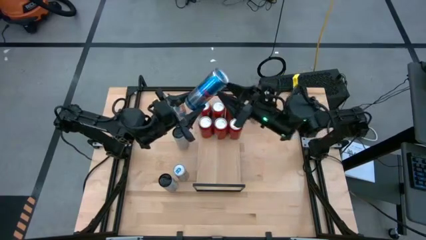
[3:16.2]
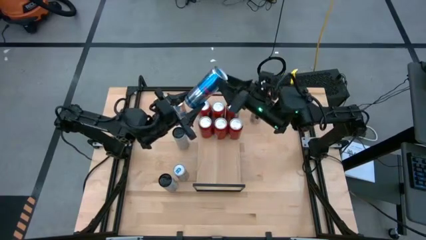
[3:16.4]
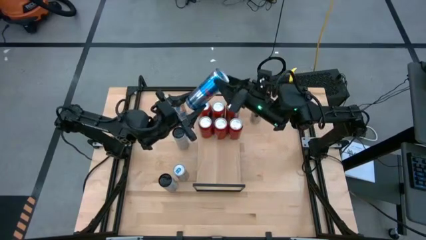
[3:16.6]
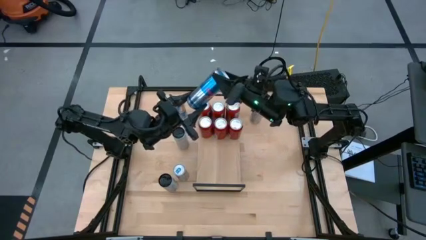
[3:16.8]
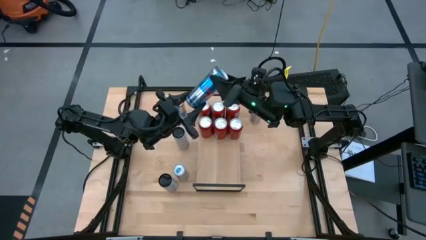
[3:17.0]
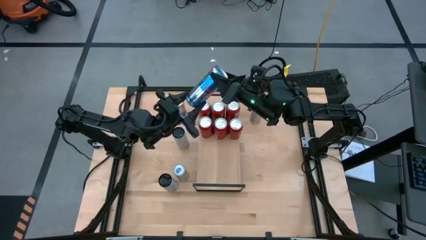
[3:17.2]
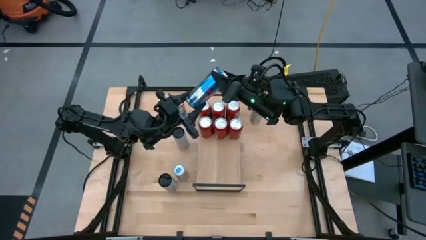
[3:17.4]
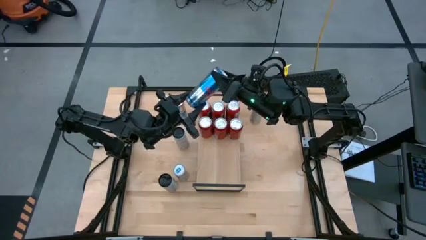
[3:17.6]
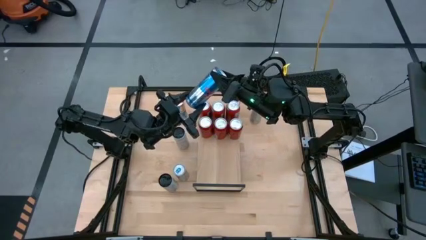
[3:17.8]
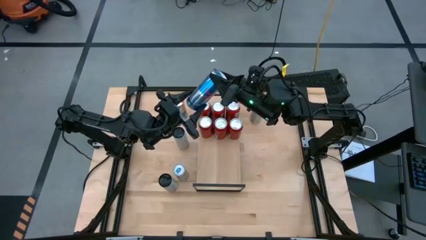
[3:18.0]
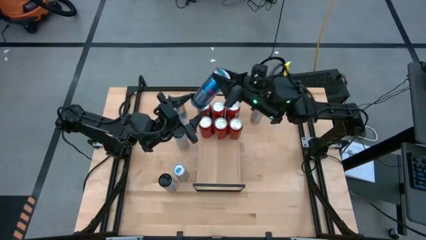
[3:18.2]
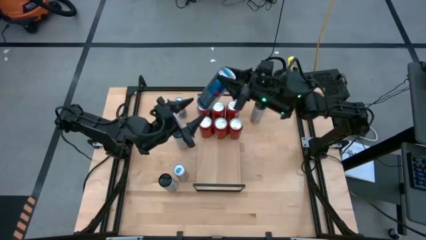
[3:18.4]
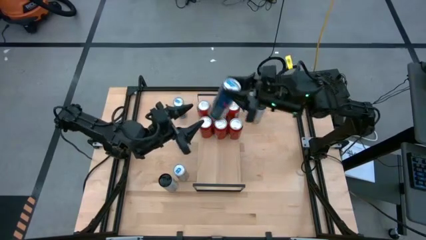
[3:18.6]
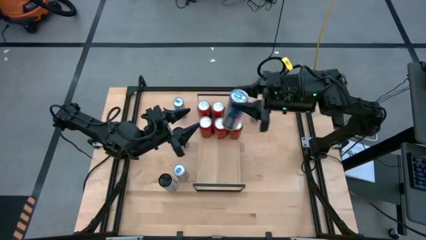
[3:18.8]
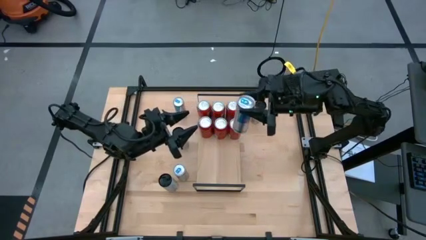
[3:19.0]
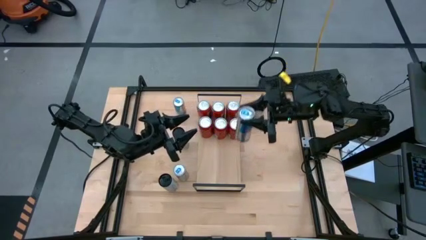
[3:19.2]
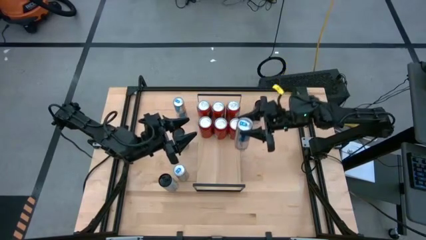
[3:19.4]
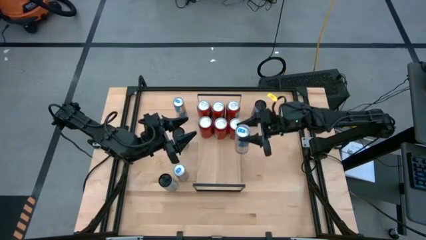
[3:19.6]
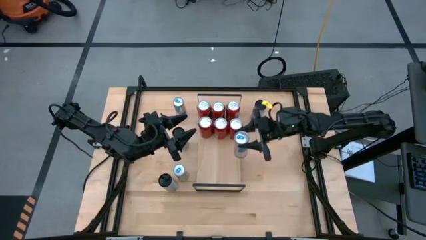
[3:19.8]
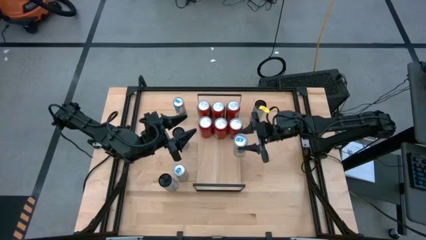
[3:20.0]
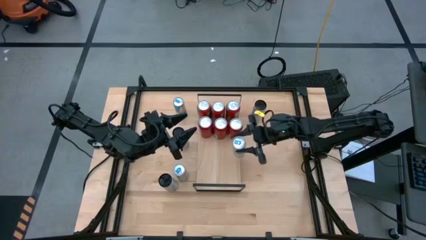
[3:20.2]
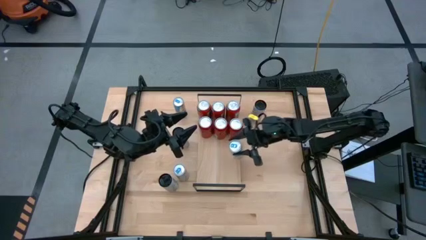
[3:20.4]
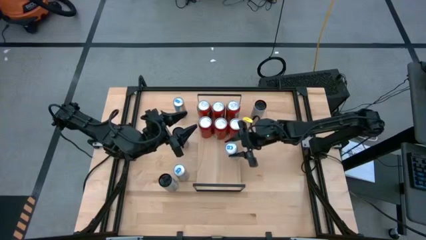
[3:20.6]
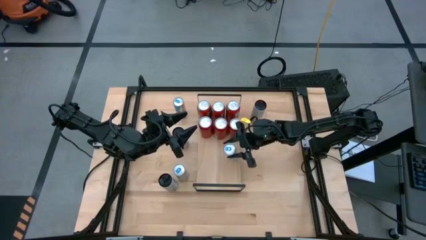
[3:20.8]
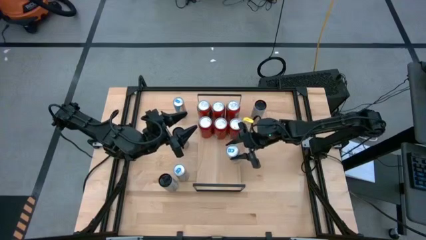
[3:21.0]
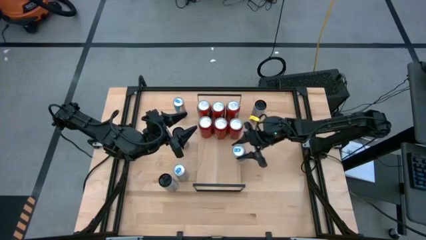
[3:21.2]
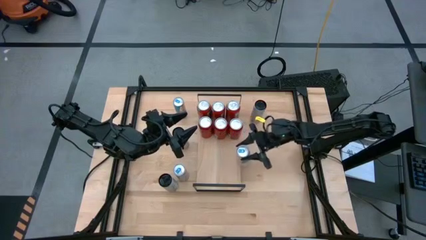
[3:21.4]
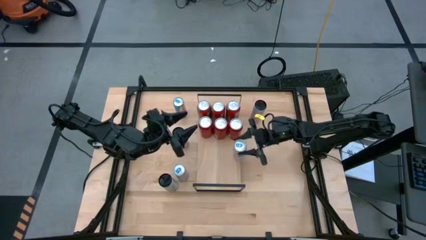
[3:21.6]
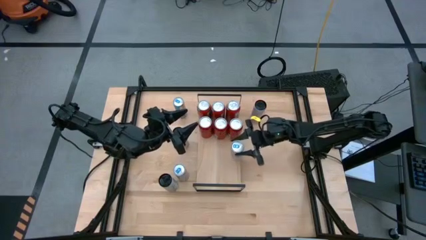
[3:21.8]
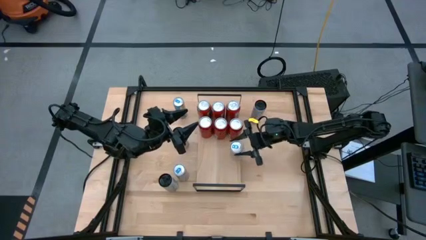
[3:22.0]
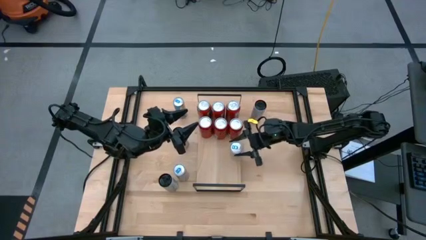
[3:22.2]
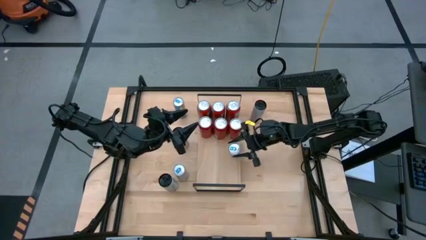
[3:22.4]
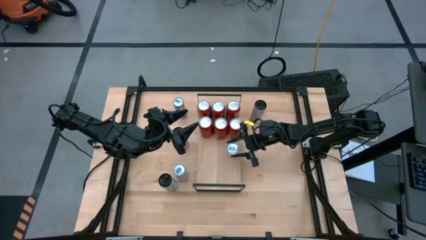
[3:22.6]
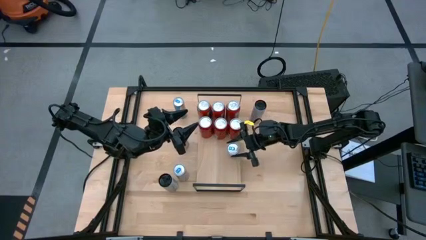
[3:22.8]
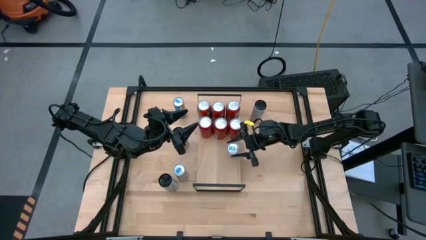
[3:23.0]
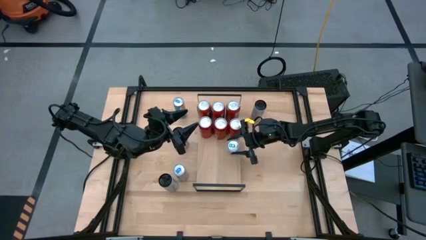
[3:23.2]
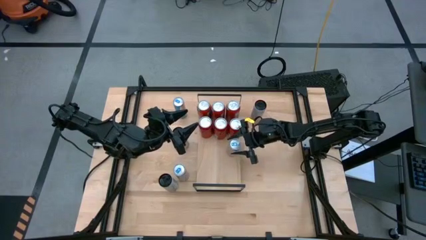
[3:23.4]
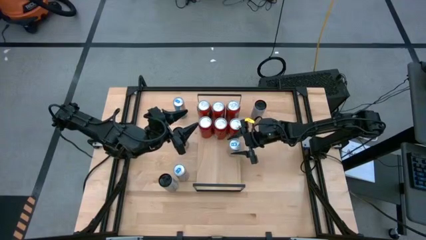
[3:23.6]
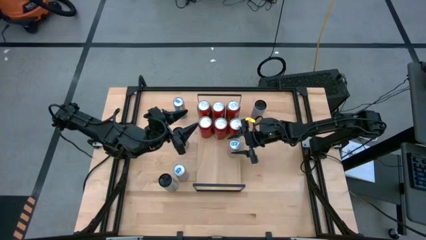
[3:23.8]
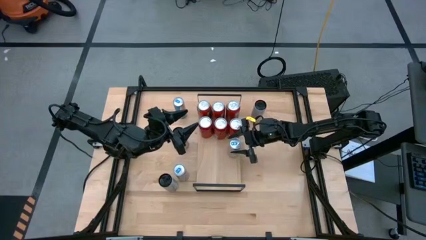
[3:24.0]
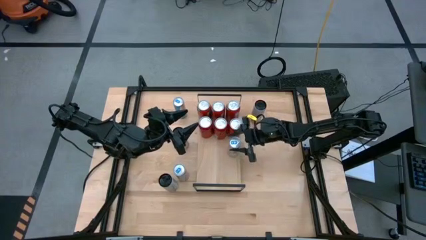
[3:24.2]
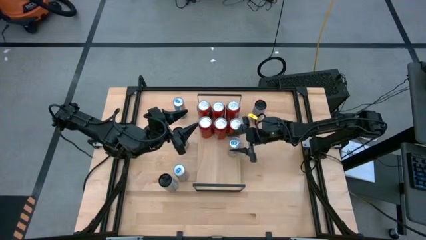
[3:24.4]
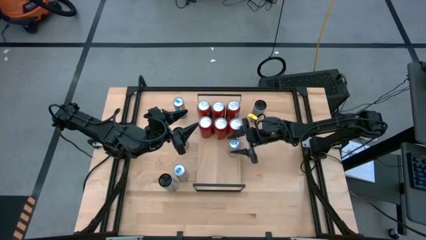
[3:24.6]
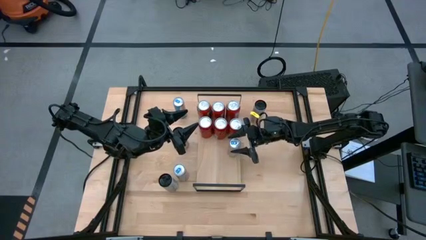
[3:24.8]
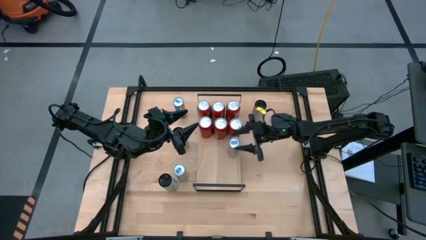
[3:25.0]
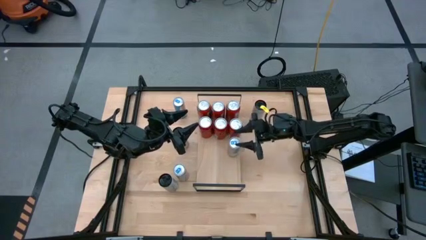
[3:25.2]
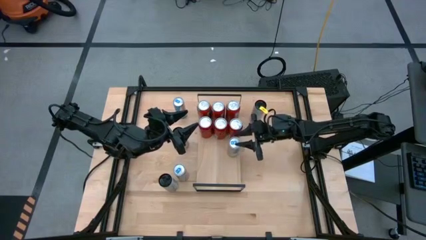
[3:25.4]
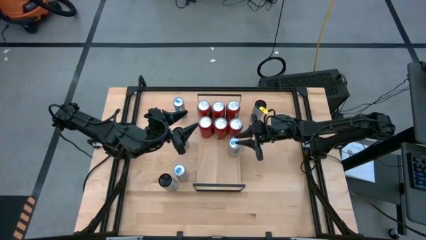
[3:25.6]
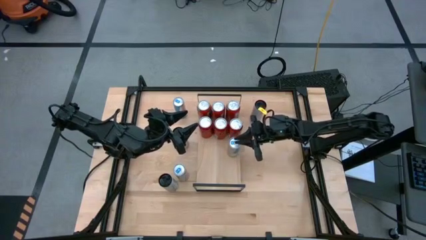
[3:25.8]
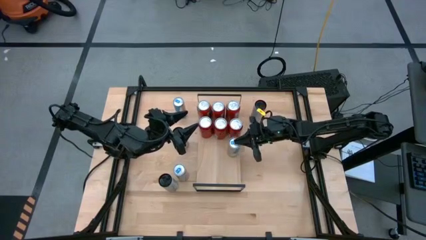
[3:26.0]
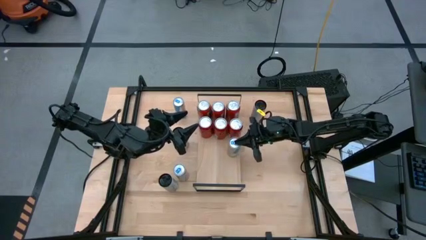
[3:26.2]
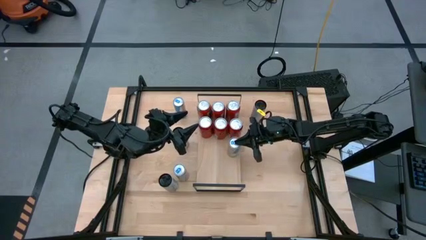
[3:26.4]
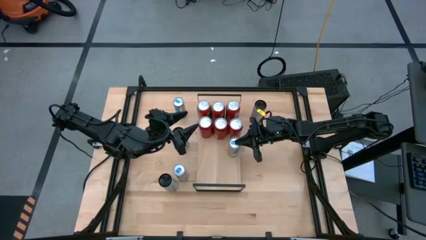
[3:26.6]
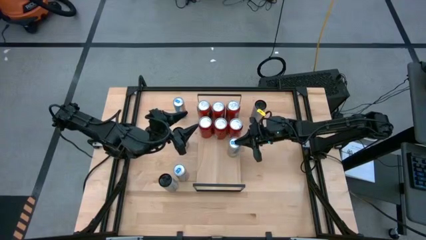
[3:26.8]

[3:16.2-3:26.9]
Task: Place canned beverage on shelf
Put the bottom right blue soda can on the shelf

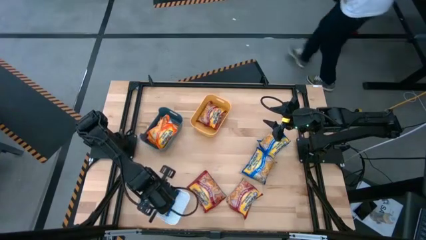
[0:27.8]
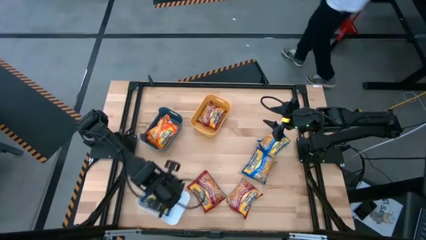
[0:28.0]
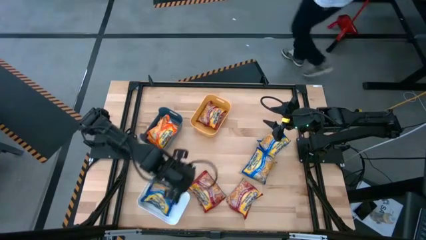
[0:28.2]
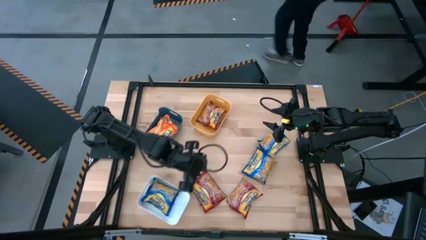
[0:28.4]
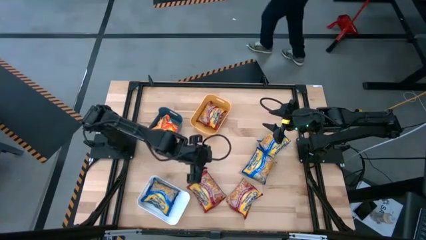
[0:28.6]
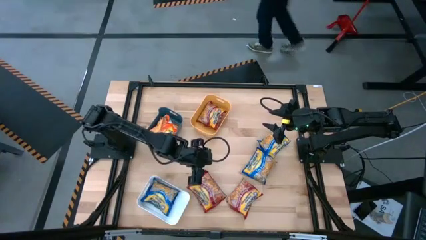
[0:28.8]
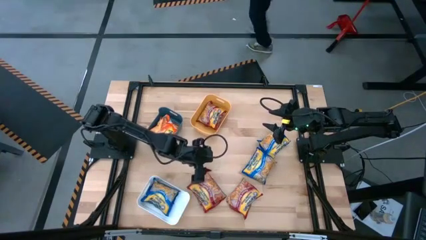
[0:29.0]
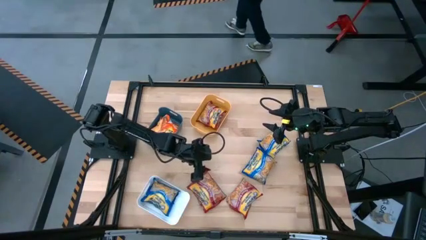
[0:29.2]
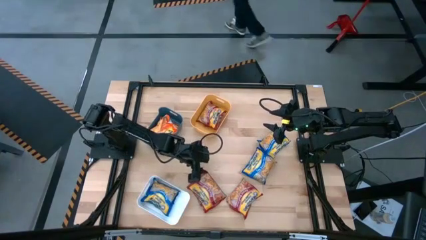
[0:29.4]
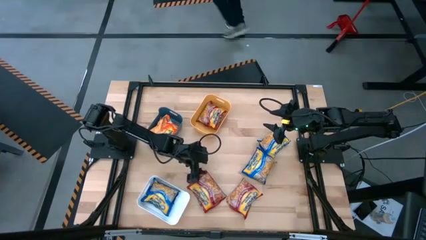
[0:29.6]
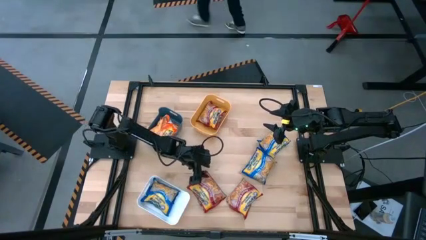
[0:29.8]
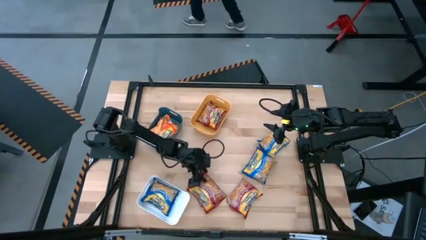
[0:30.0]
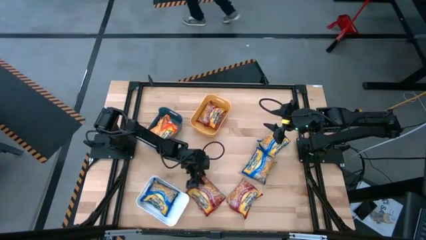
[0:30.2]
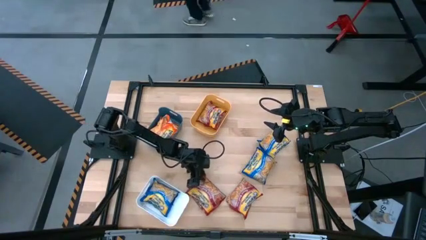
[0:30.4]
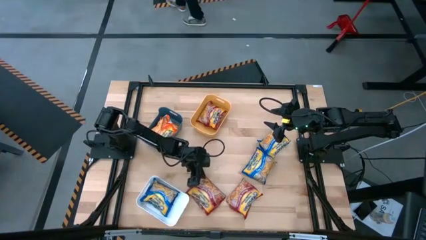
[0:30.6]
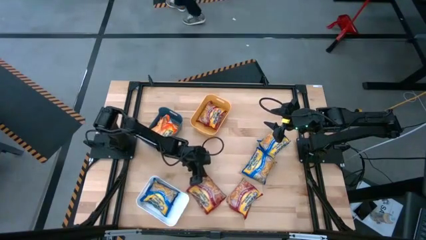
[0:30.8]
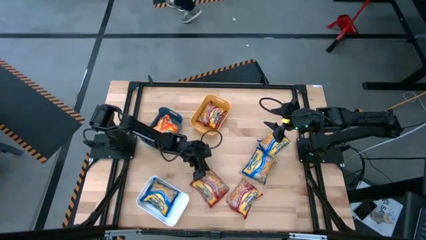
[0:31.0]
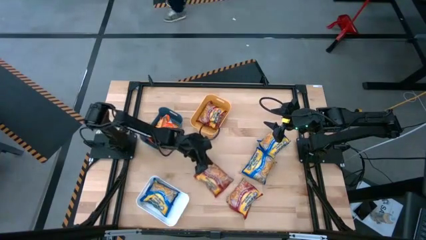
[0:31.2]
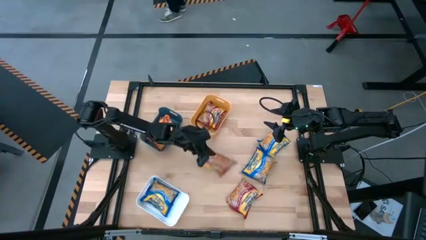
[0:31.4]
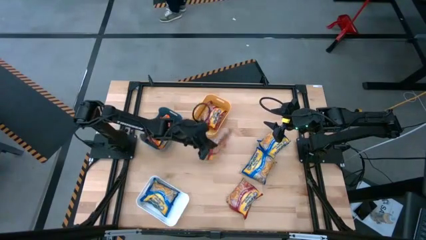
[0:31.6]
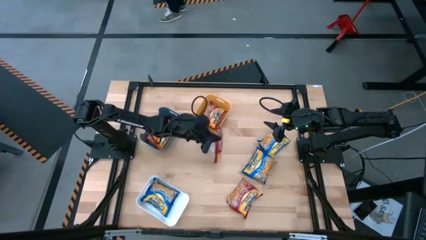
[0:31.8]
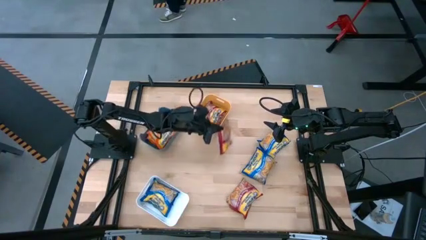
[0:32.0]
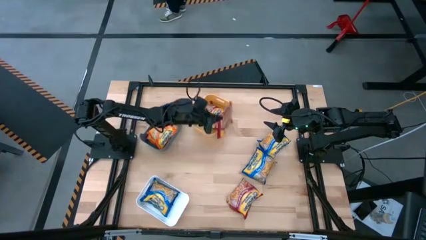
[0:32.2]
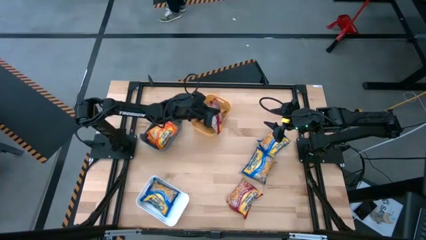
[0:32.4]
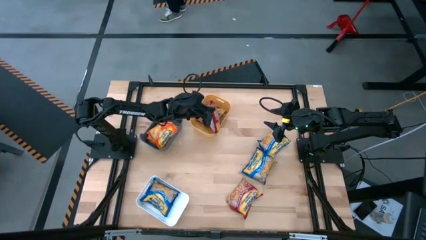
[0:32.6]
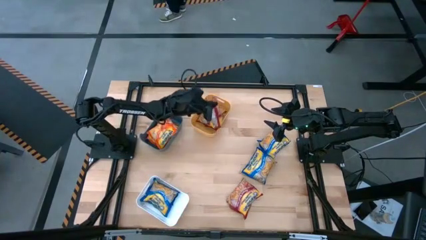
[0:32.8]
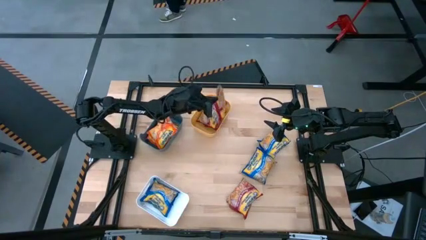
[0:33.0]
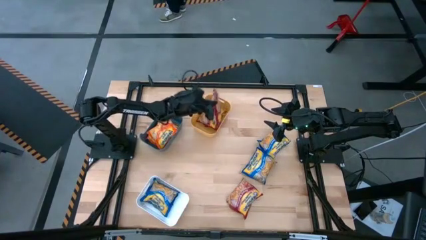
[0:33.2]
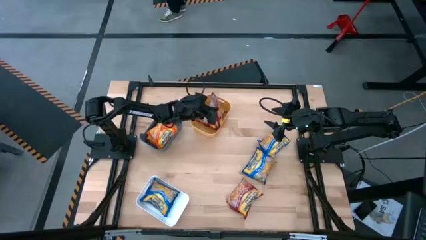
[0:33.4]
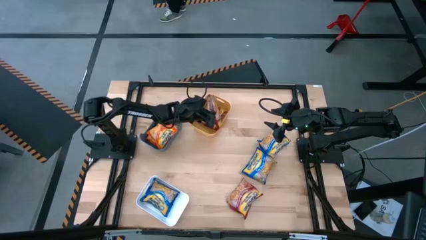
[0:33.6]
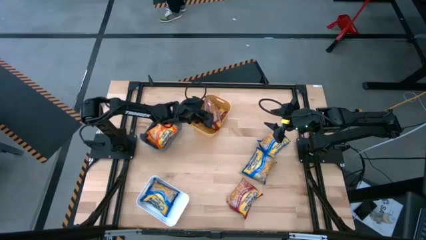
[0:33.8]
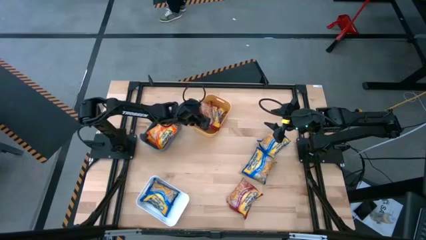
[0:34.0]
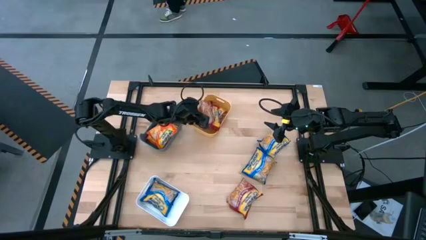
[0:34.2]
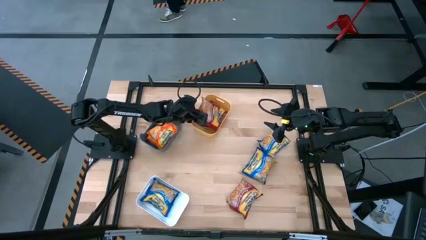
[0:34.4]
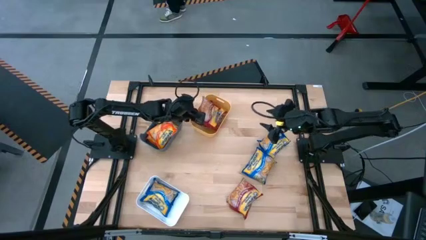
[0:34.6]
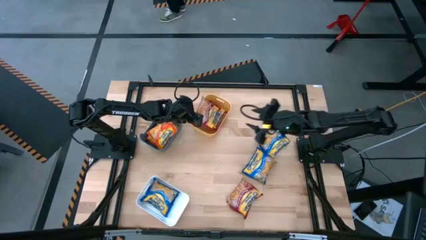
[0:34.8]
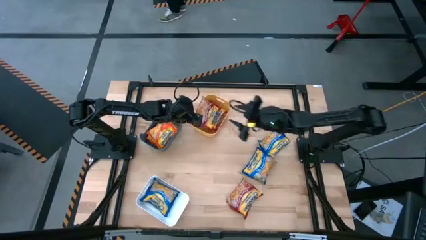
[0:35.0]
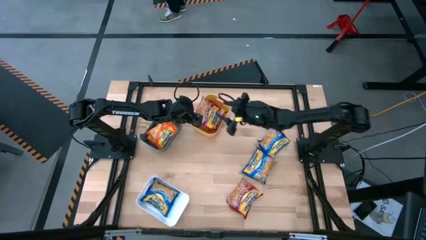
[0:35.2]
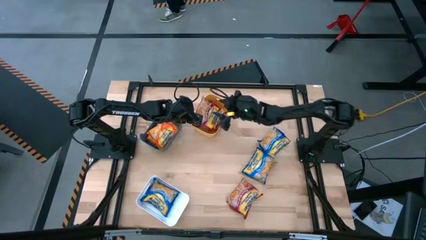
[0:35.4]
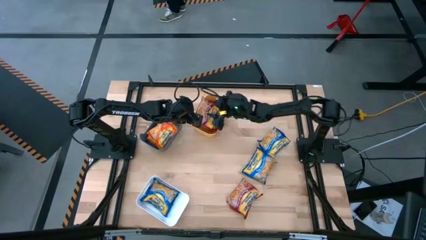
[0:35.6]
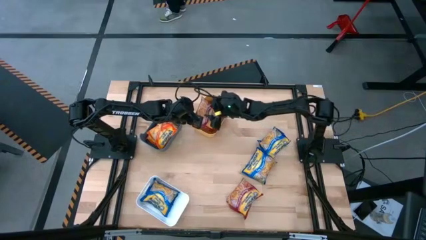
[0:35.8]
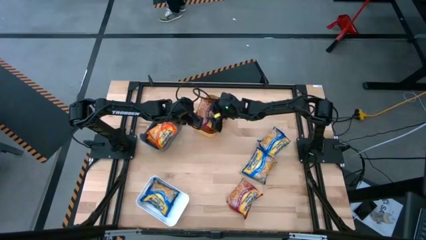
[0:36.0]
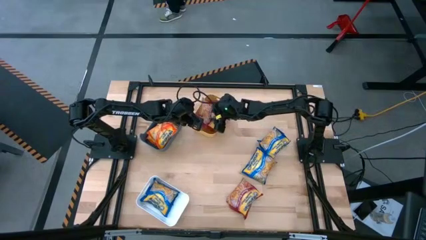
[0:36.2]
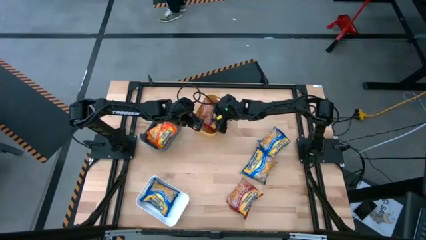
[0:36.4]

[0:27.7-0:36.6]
Task: Sort Maruchan noodles
Put the left red noodle pack into the yellow bin
